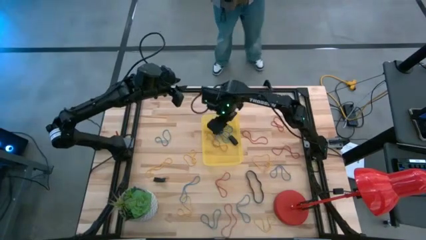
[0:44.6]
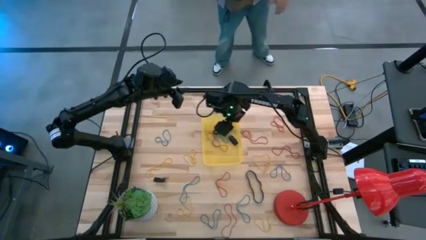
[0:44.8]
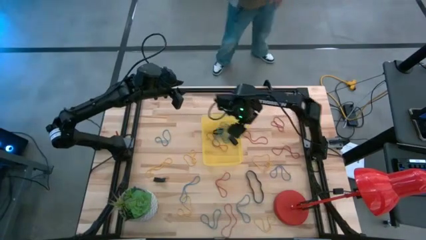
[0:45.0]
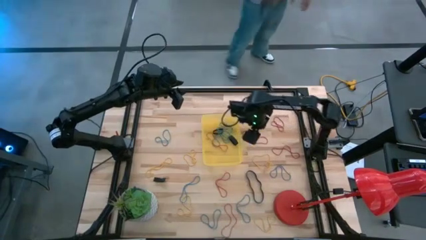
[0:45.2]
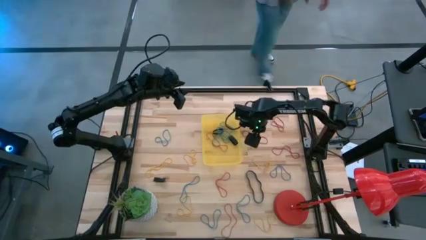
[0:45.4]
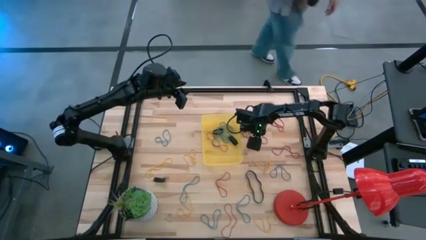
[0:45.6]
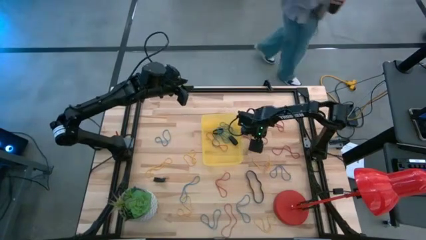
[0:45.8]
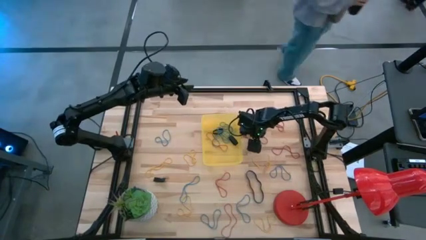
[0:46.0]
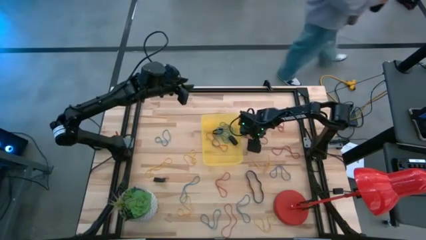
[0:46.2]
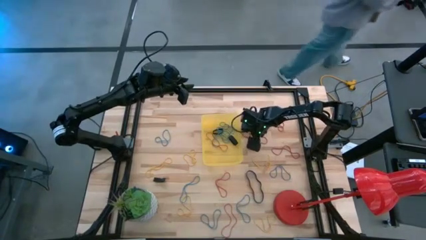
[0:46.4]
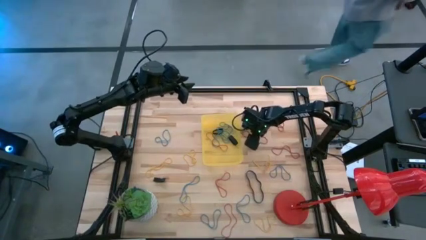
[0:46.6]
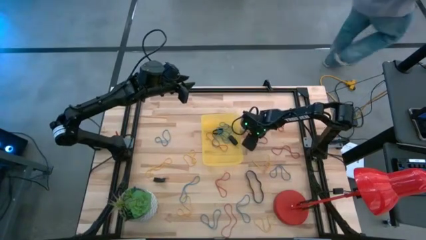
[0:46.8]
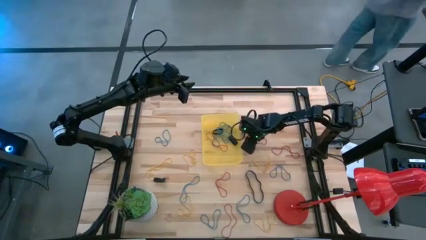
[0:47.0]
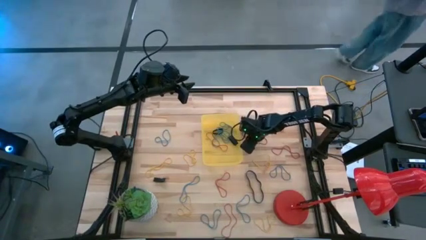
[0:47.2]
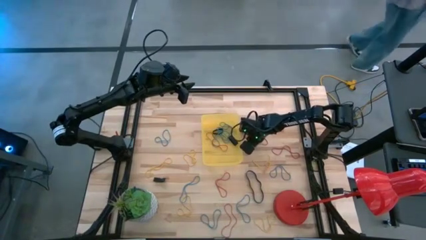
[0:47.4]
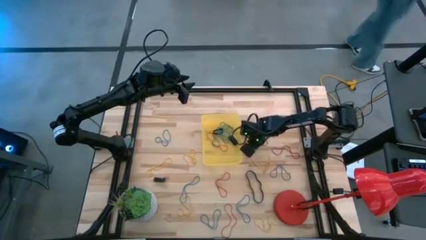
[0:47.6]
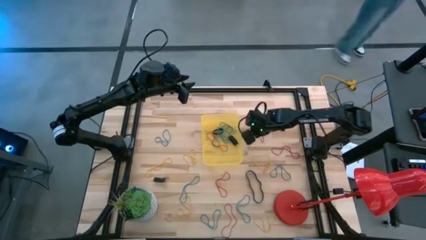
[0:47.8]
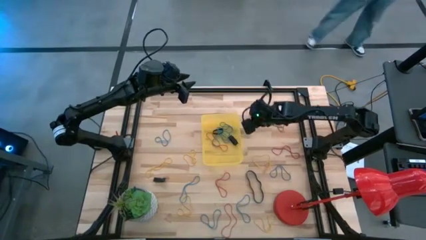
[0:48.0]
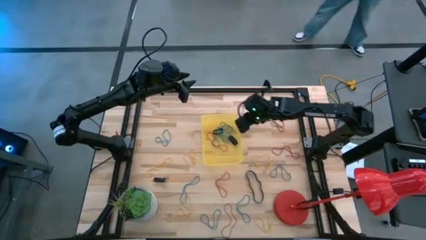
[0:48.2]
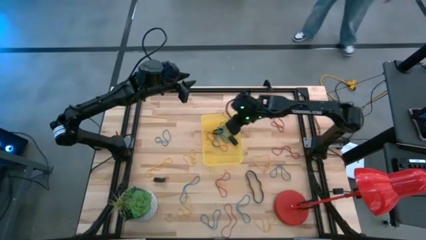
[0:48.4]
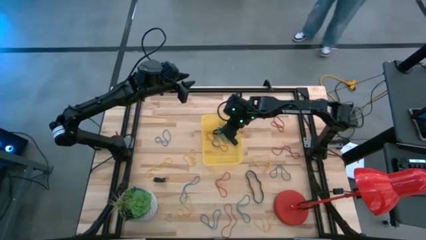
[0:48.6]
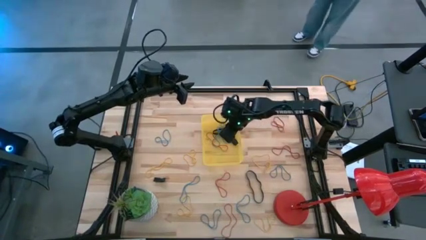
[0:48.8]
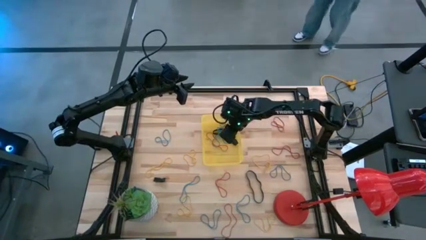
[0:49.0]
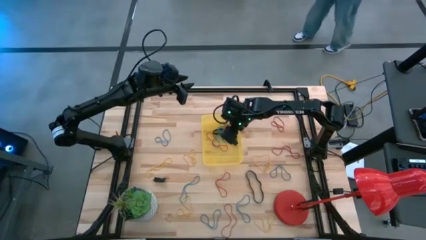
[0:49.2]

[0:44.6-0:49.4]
Task: Pick and place rubber bands into bin
Put the red rubber band into the yellow bin

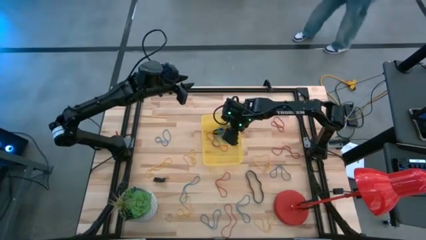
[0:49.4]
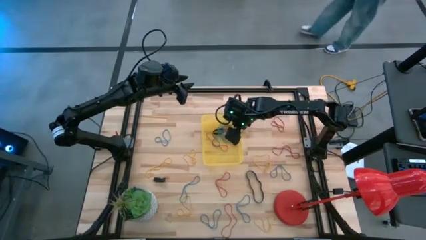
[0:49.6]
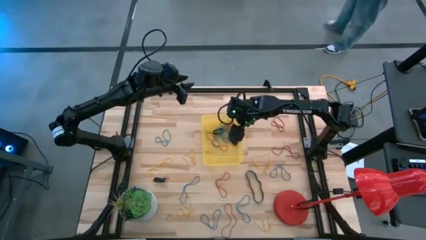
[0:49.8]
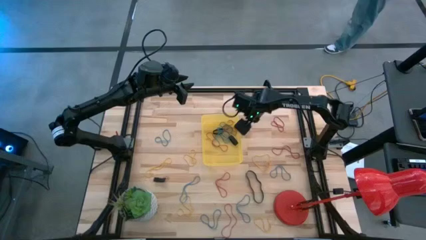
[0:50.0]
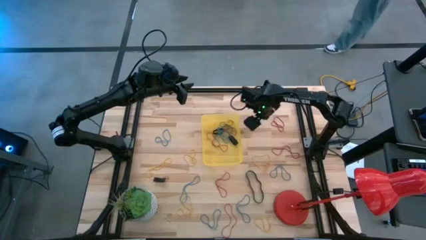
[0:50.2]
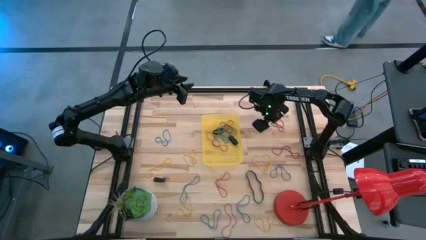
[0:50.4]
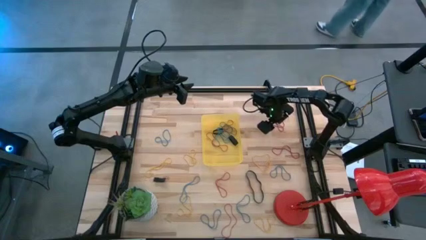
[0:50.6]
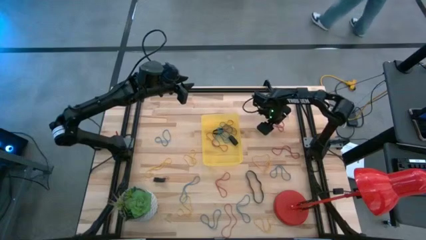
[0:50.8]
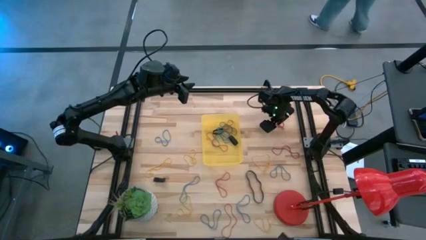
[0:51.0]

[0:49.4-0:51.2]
Put the top right red rubber band into the yellow bin

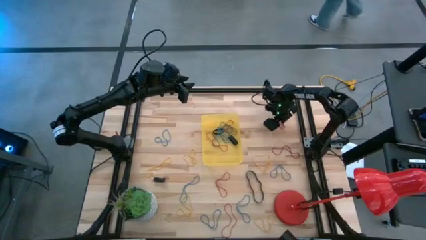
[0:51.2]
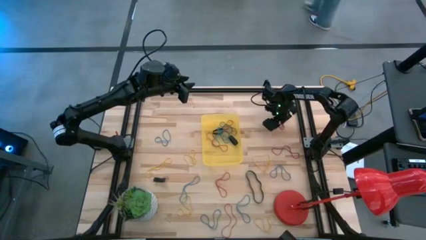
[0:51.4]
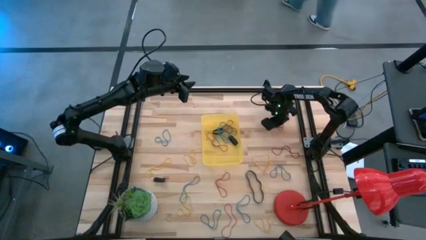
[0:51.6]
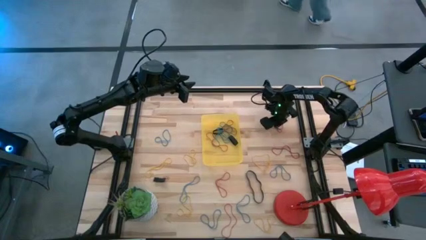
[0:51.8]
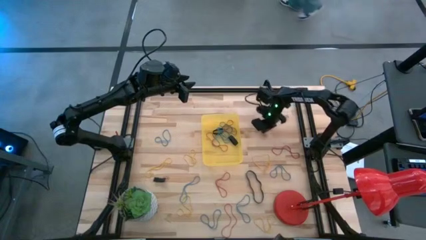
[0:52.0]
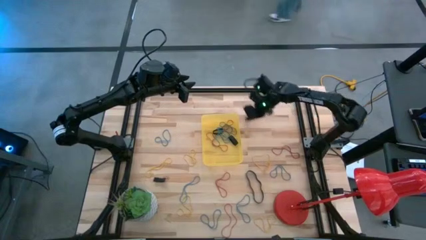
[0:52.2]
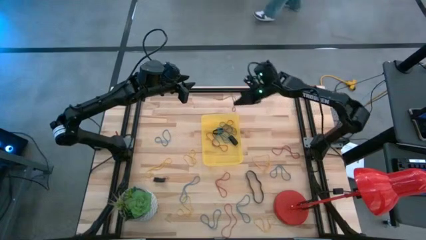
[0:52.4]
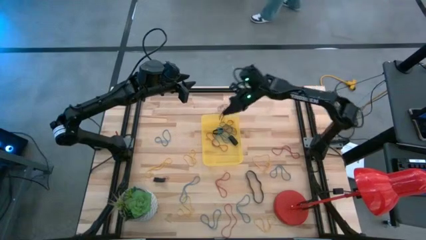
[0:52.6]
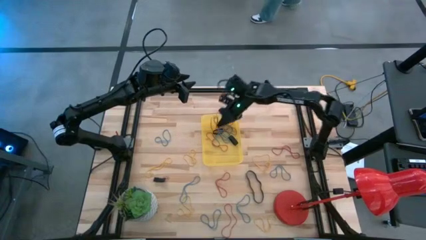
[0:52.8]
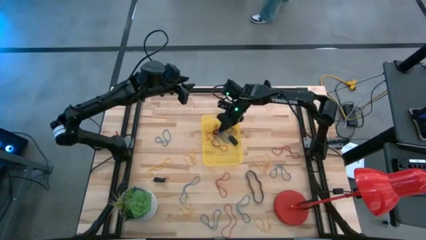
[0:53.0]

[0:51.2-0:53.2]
Put the top right red rubber band into the yellow bin

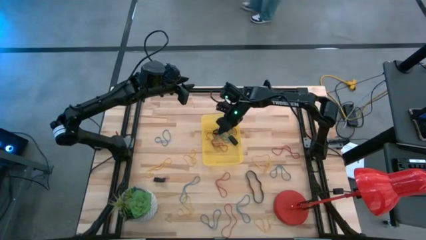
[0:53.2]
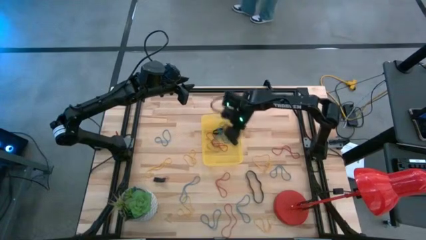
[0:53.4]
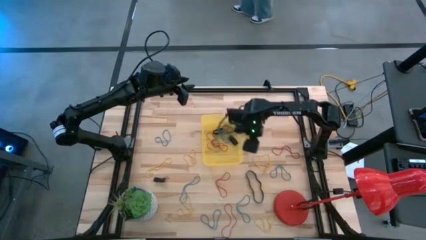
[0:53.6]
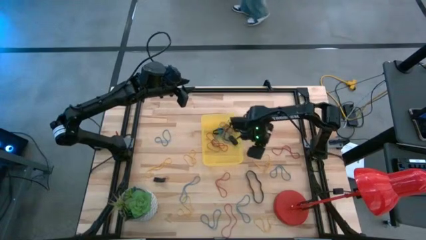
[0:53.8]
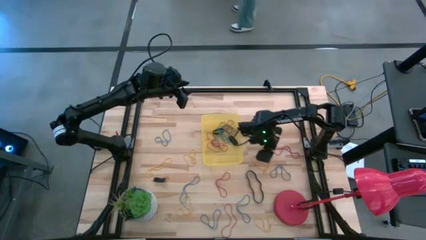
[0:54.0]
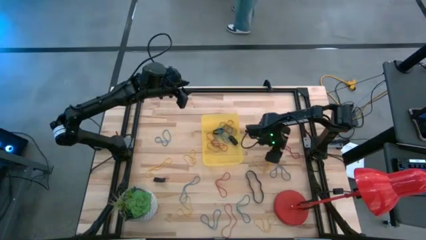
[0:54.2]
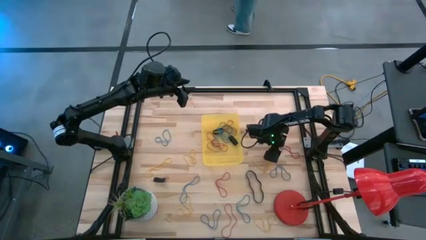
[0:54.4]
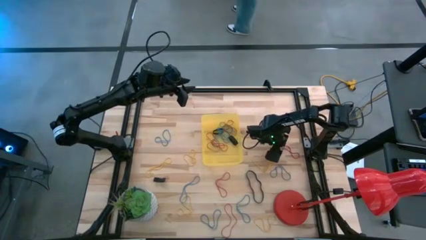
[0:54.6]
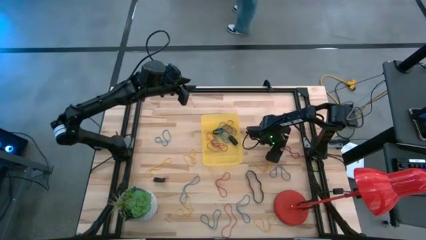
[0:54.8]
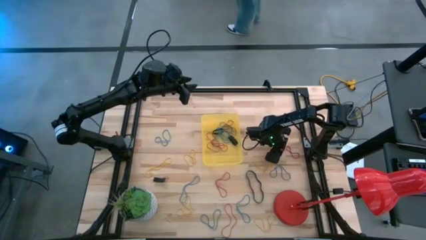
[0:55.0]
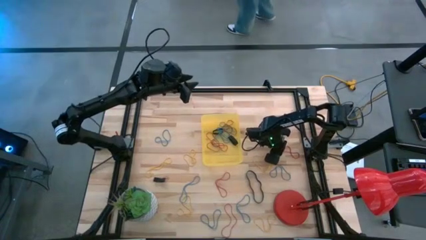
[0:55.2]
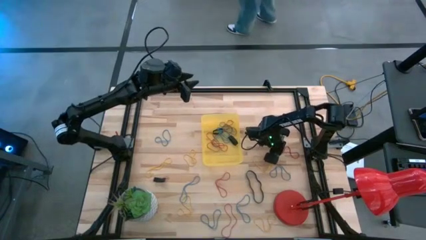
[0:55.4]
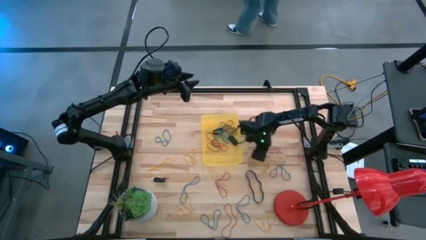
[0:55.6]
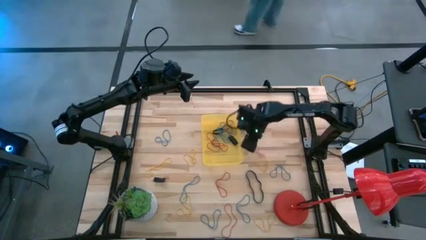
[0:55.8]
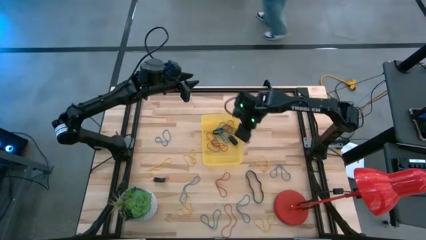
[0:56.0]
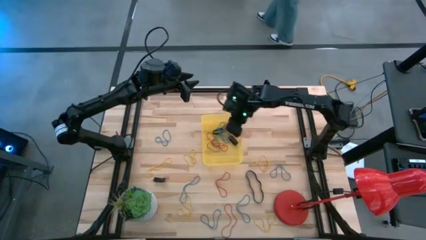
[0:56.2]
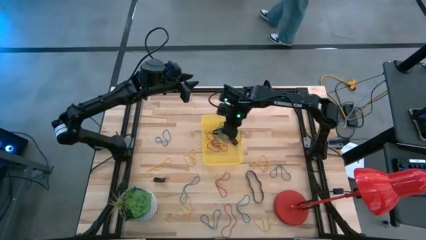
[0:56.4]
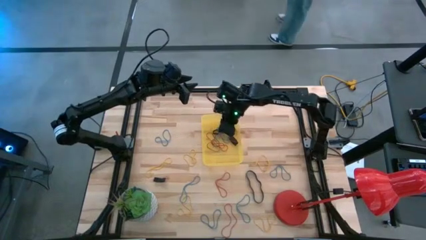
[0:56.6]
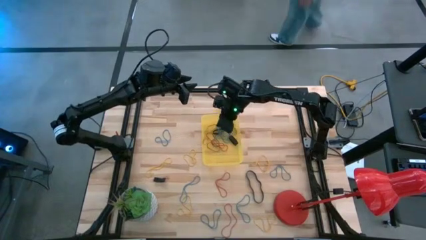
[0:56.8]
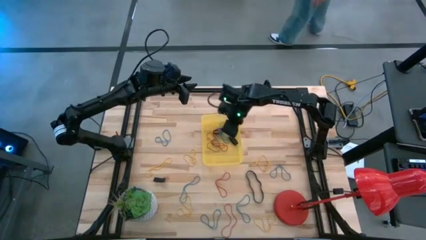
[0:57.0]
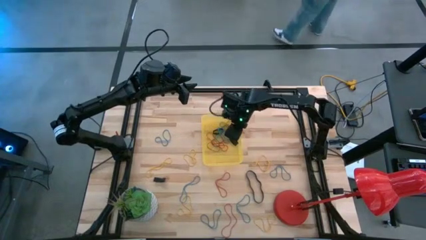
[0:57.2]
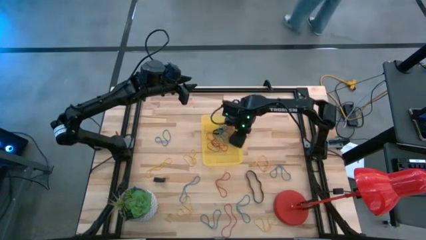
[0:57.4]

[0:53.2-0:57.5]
Put the top right red rubber band into the yellow bin

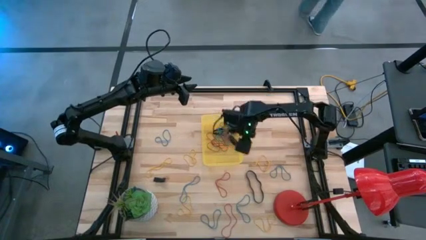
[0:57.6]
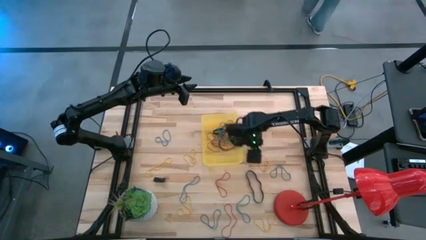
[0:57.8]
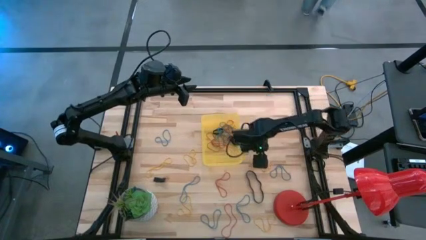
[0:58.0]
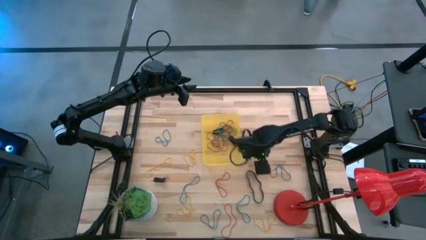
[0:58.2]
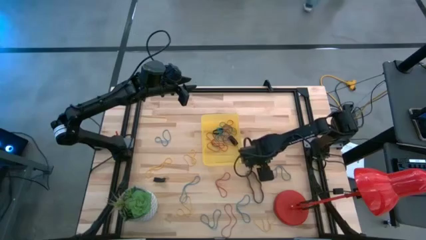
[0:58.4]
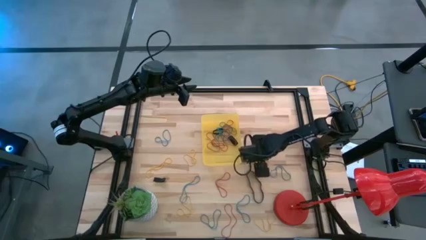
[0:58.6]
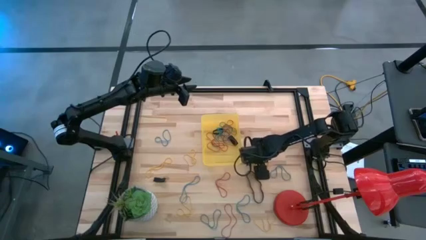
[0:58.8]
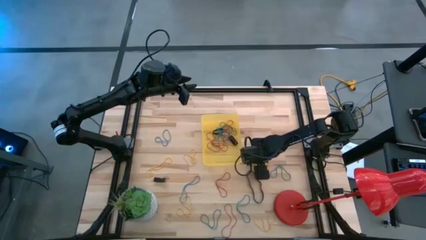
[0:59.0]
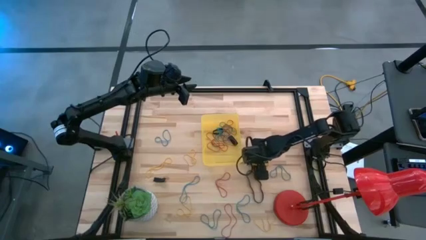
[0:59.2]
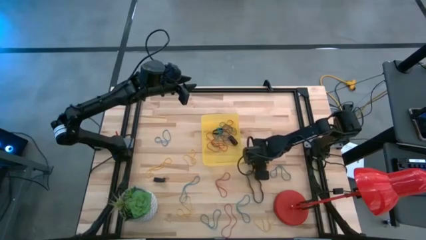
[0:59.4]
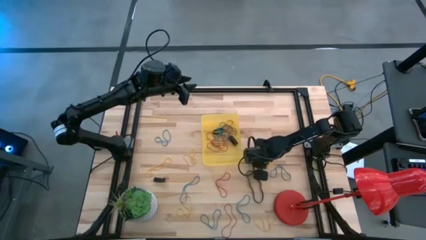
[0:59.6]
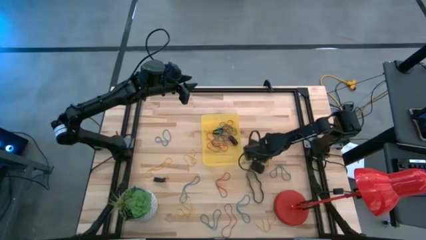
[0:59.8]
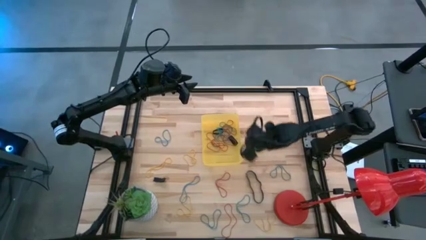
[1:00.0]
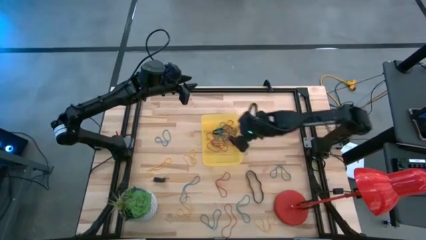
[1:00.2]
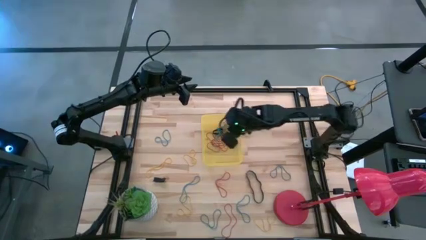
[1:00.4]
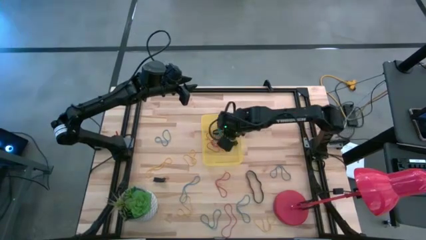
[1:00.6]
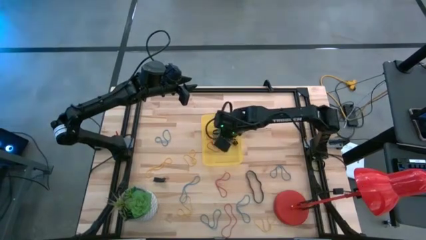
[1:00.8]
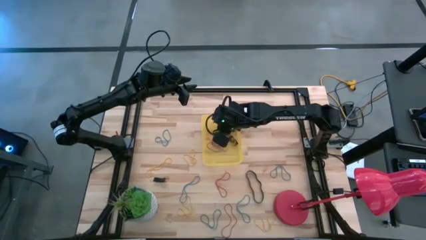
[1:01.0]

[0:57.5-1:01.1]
Put the yellow rubber band into the yellow bin
